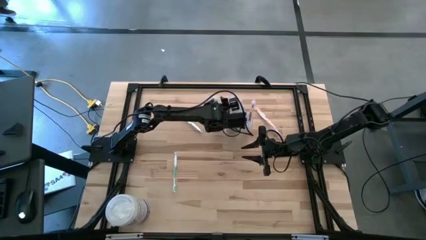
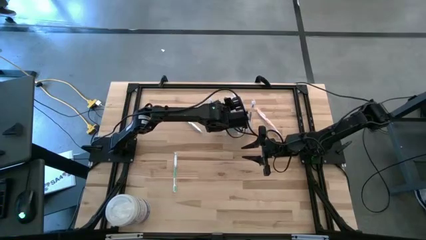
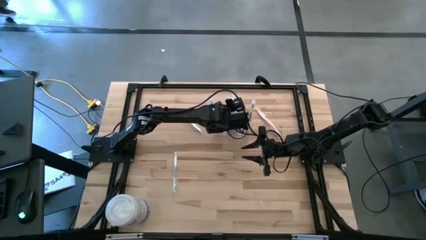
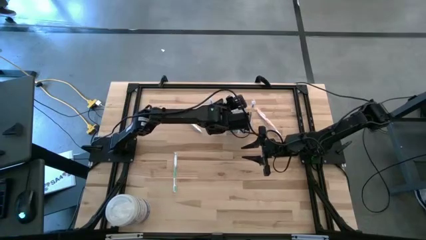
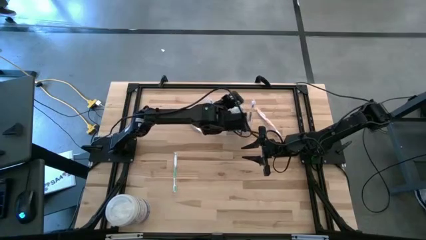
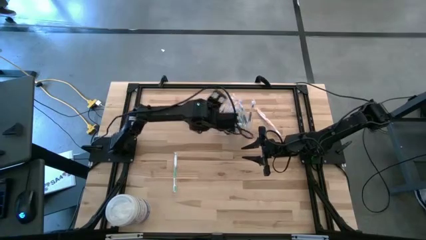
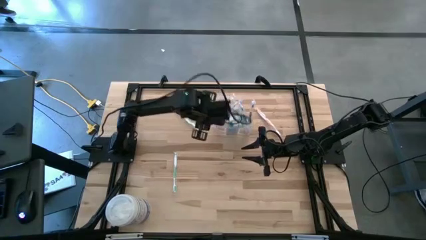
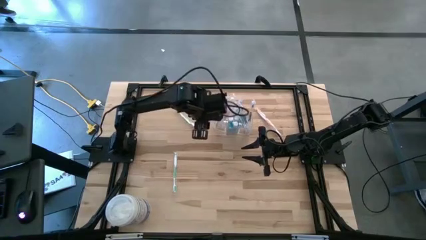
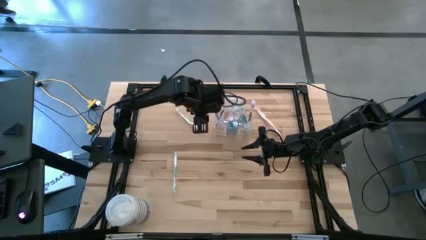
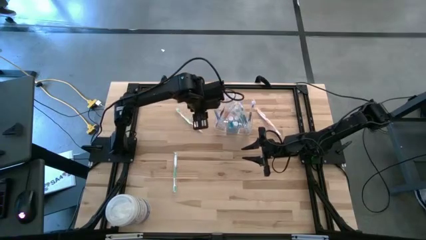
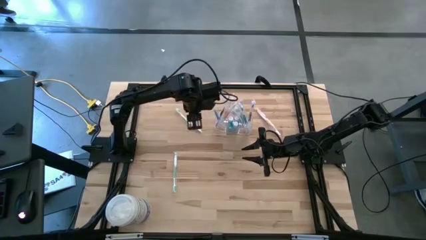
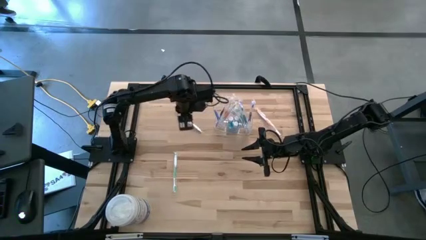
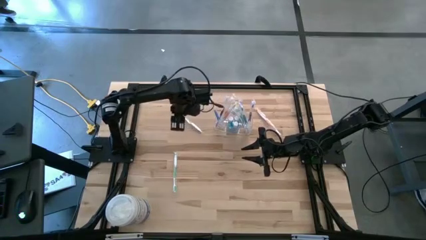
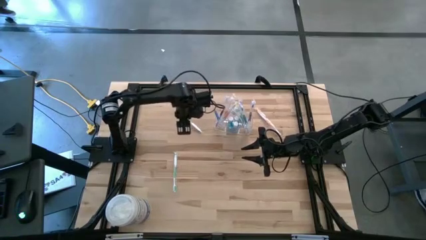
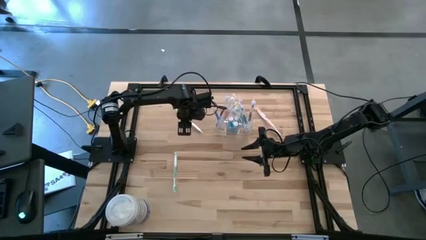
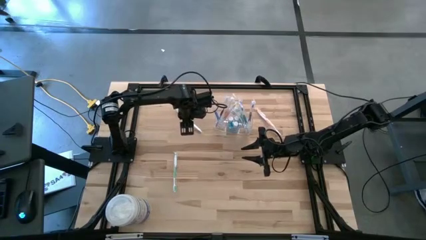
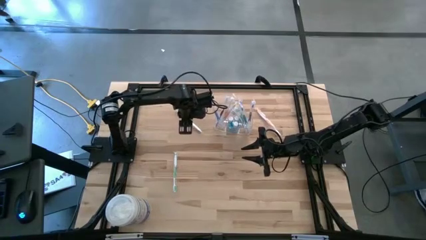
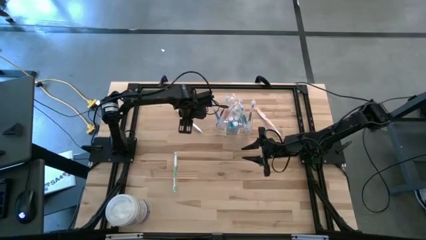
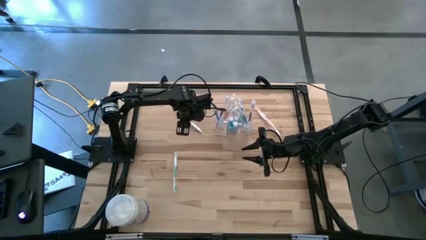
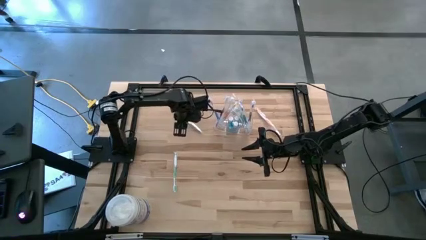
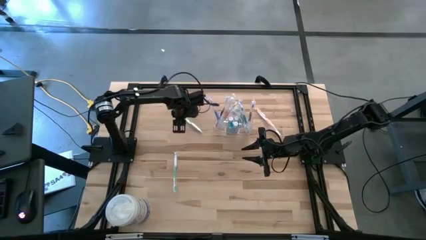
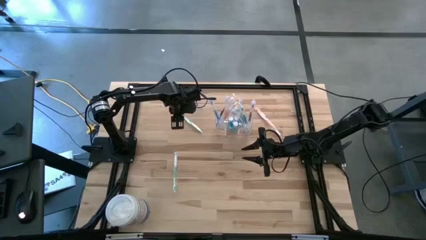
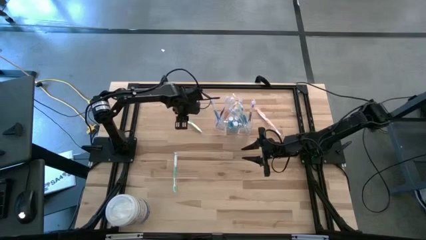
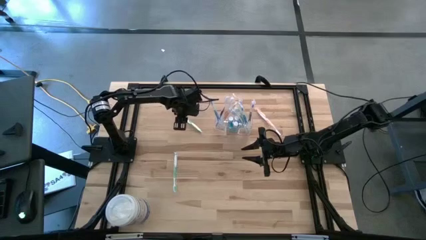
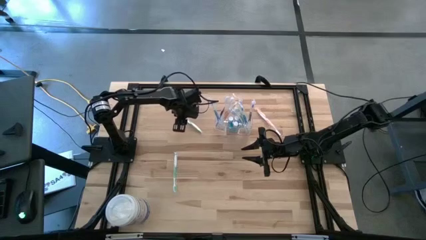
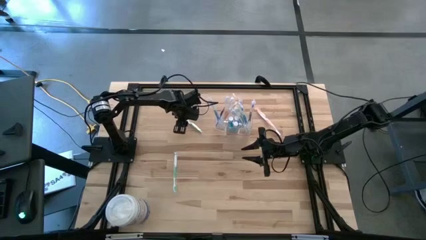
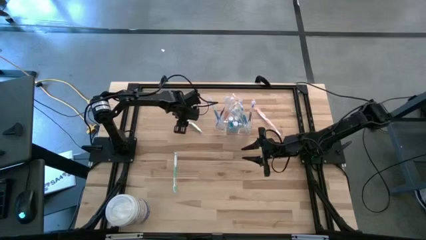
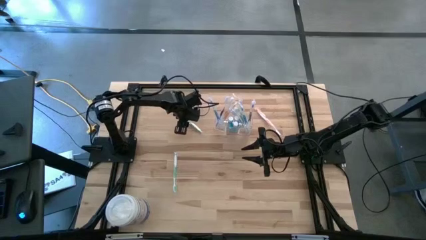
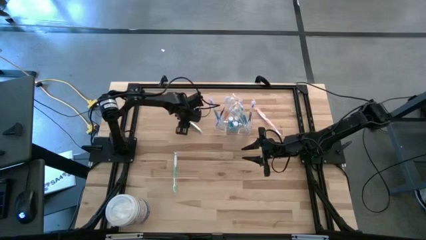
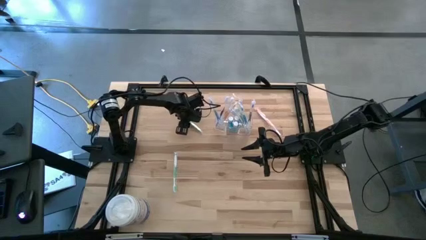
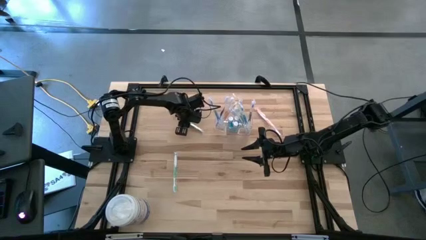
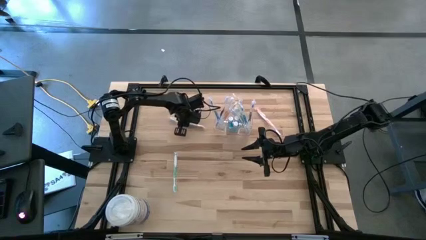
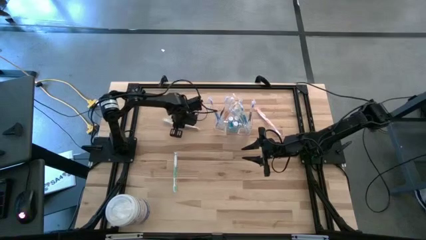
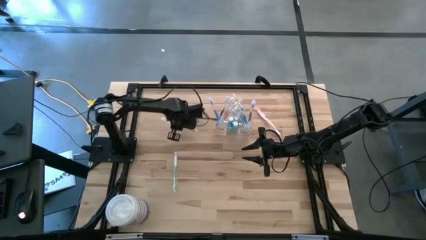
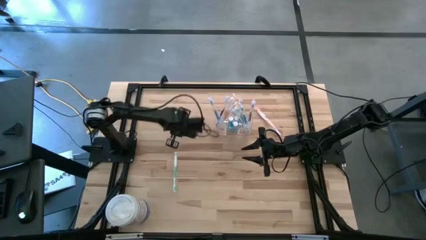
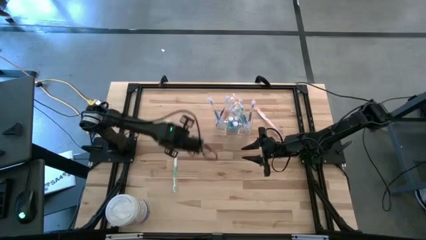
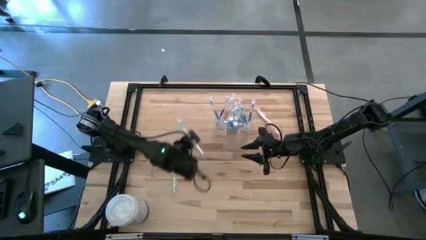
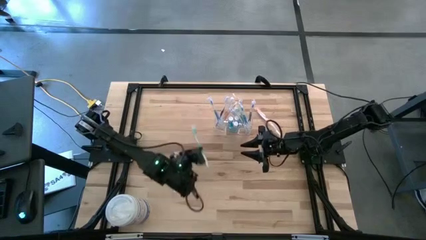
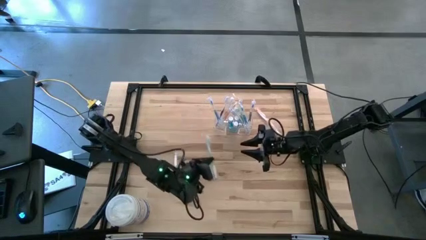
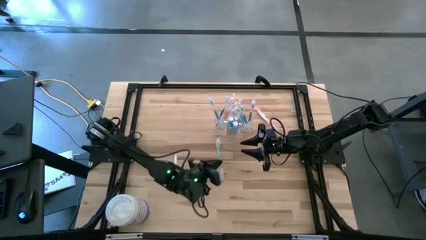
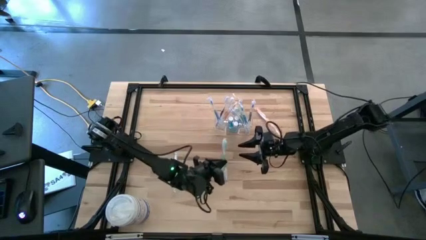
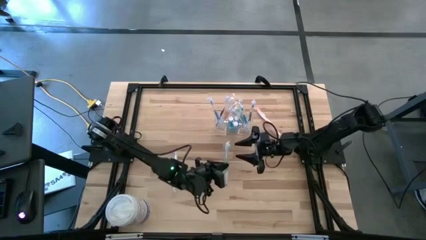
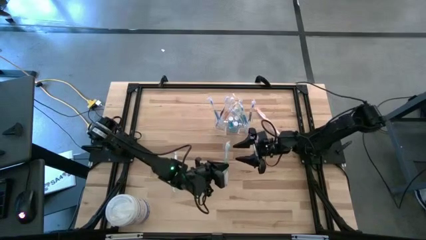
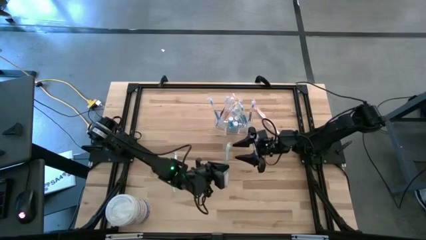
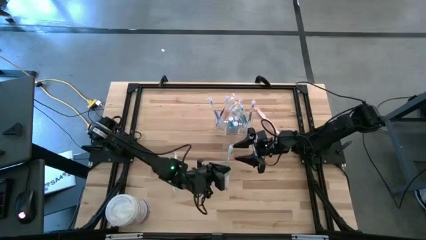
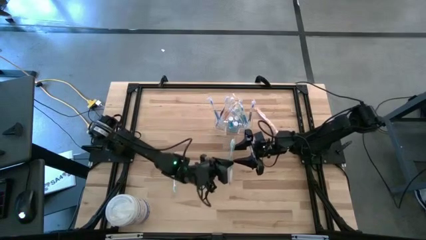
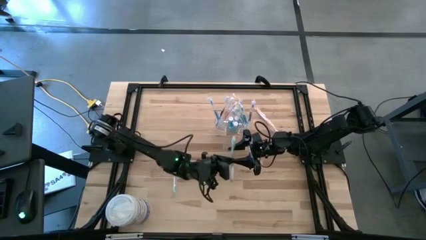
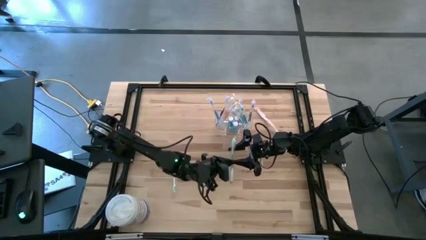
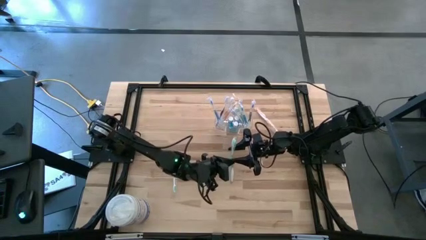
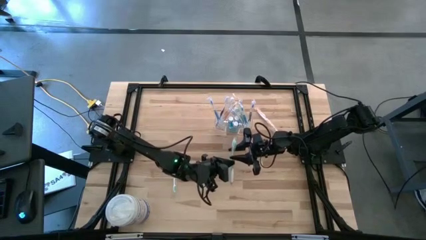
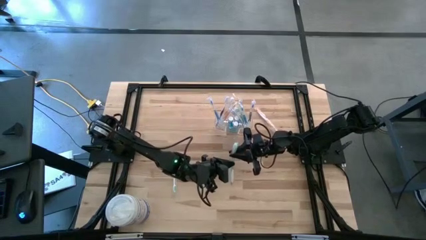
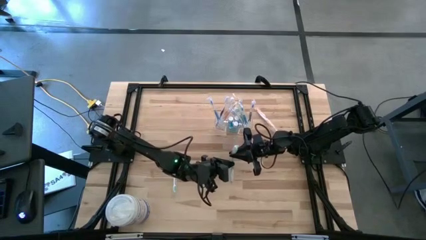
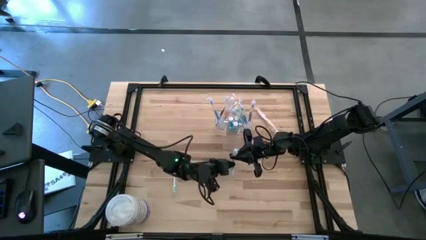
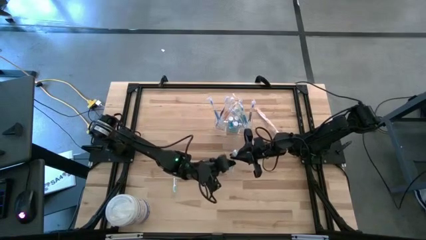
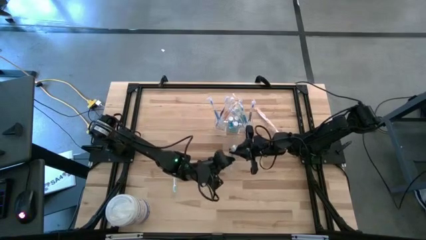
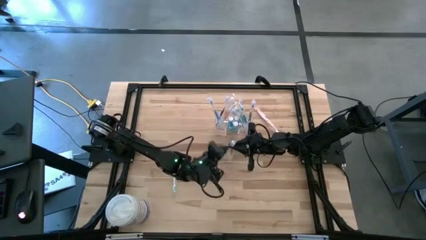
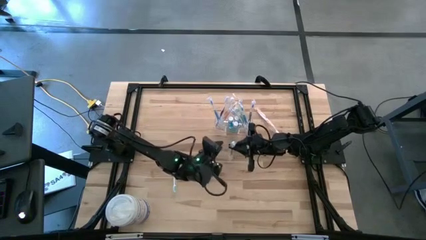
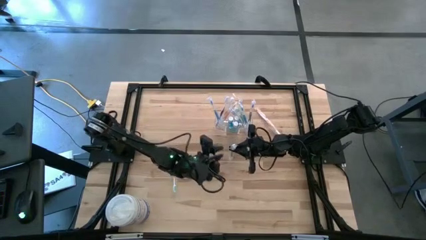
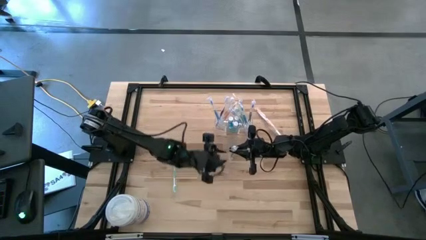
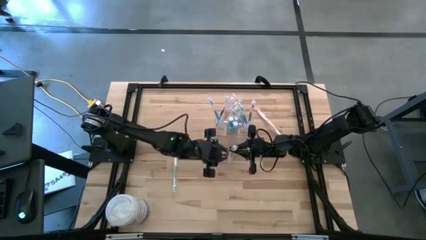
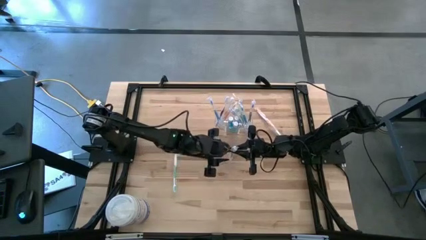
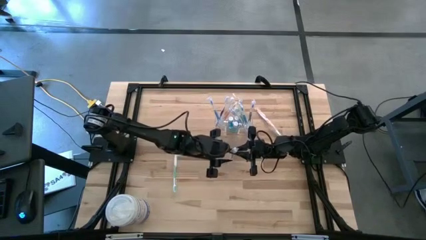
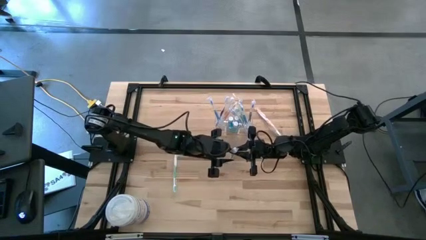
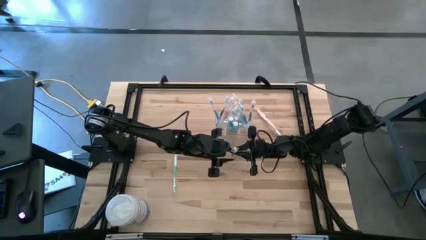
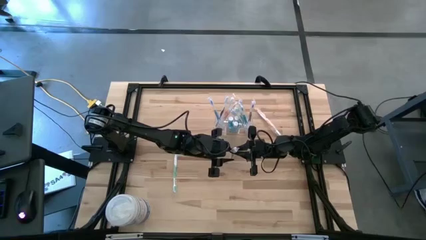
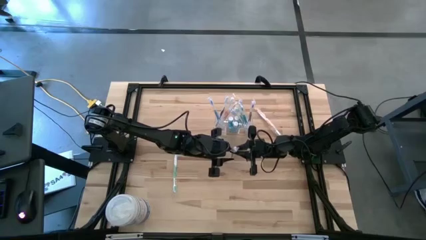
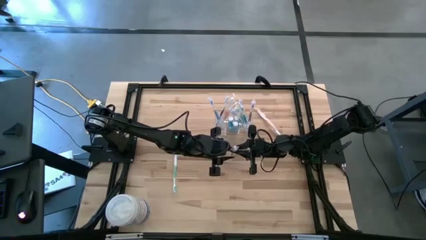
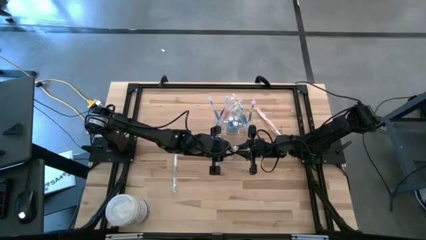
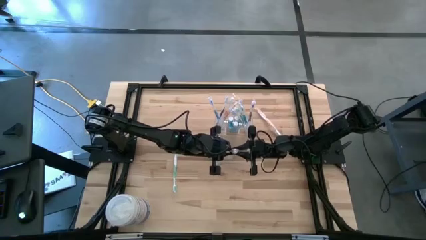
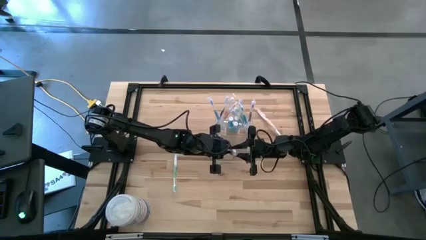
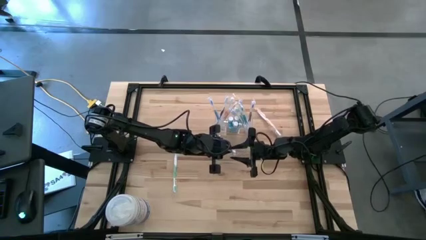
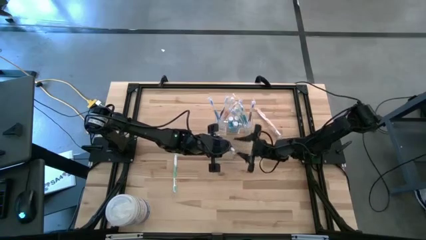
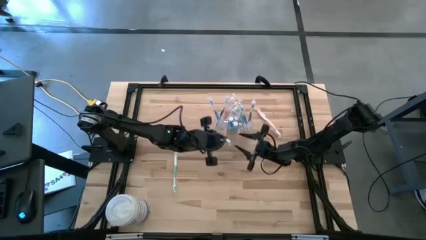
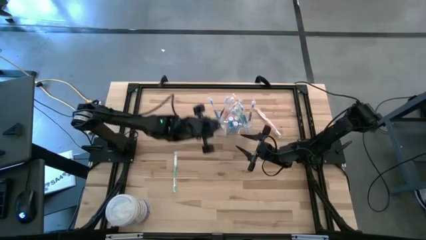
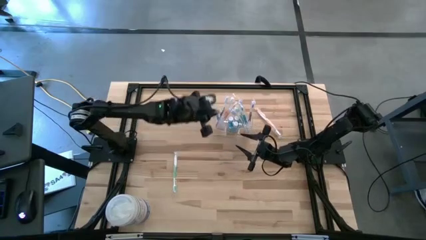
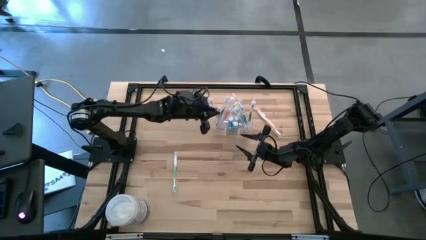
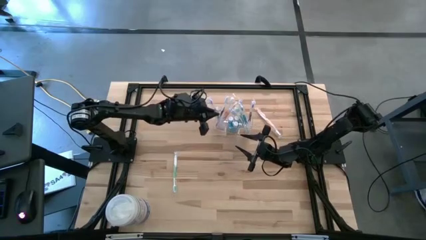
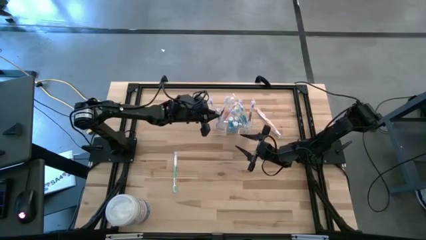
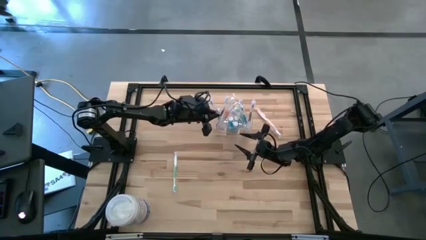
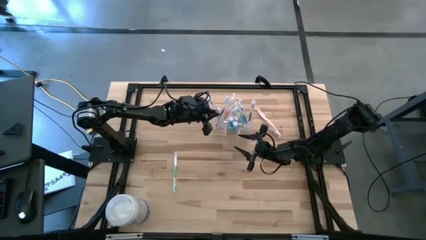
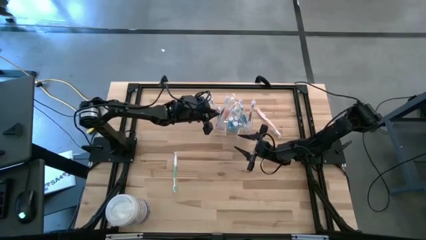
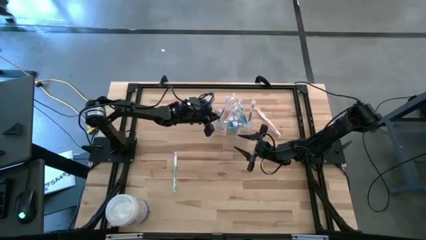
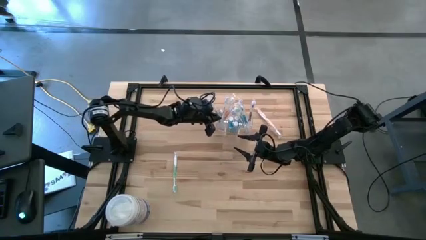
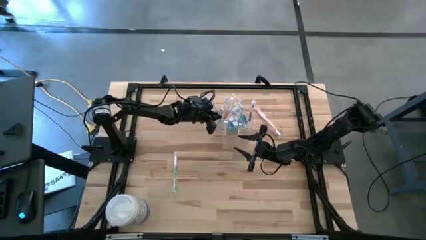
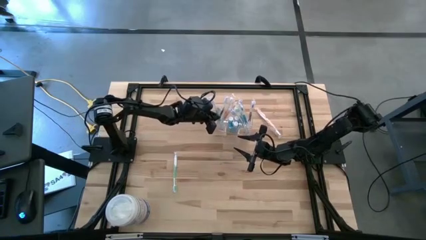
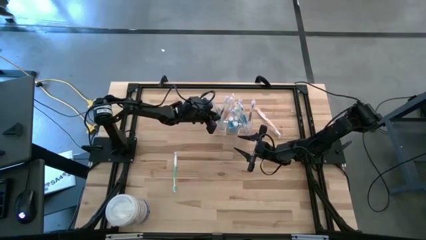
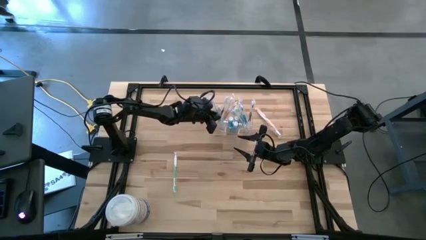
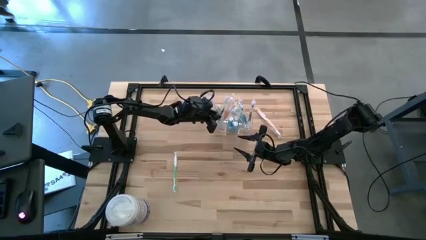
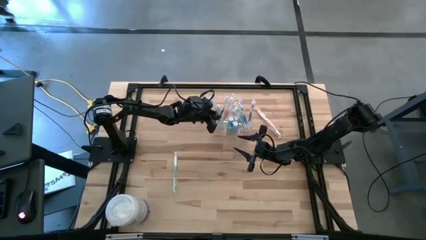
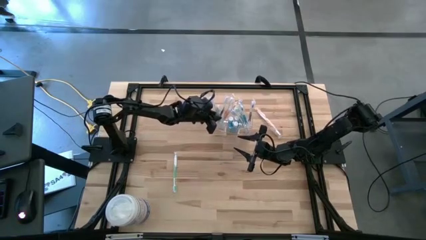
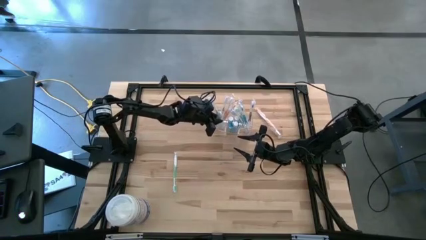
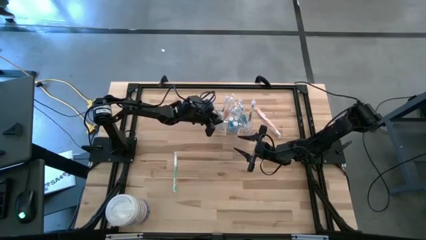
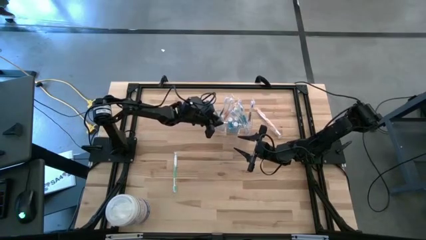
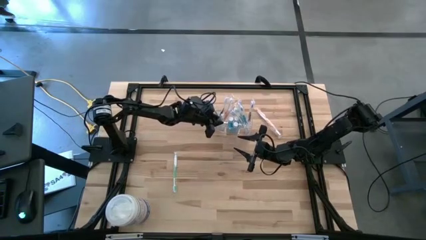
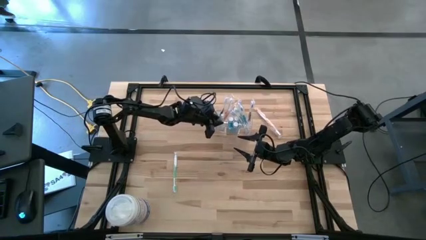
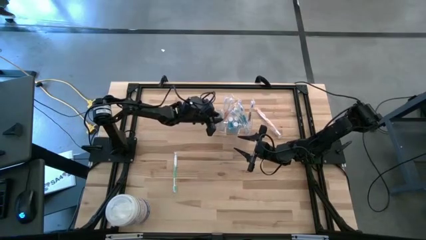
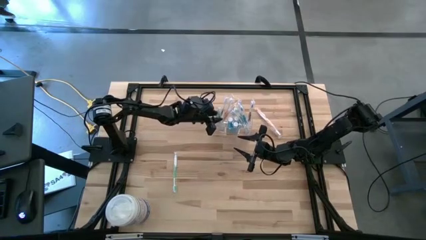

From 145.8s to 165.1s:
Task: Pick & Place toothbrushing station
Put the top green toothbrush into the transparent organizer
